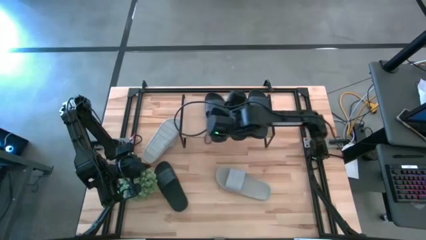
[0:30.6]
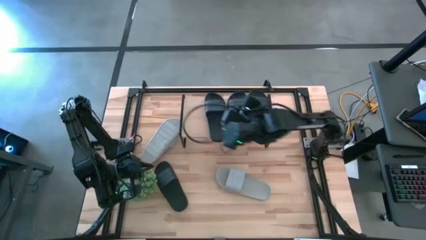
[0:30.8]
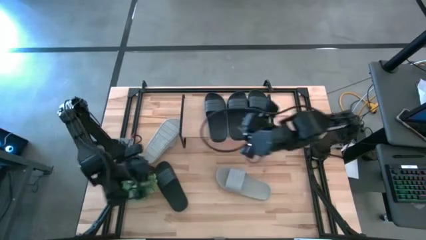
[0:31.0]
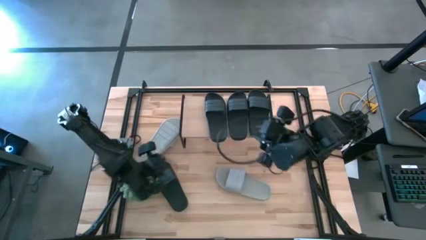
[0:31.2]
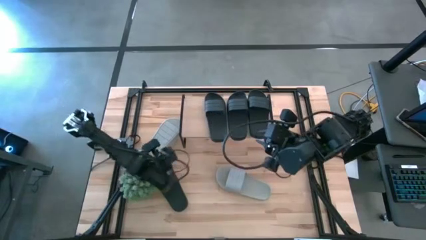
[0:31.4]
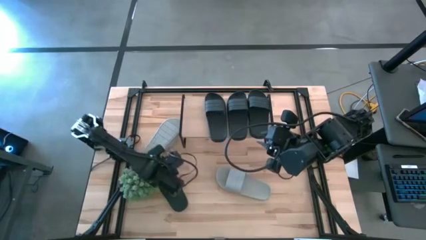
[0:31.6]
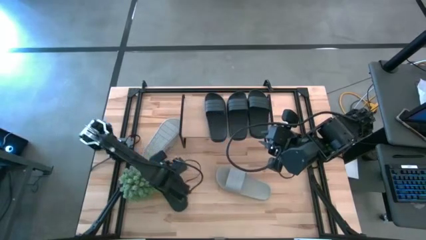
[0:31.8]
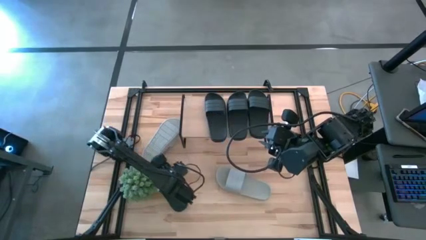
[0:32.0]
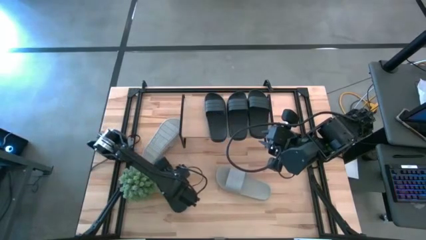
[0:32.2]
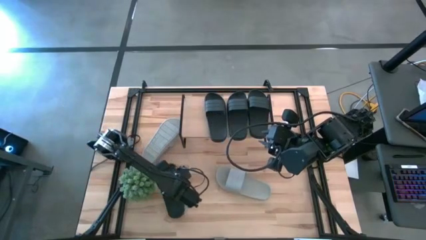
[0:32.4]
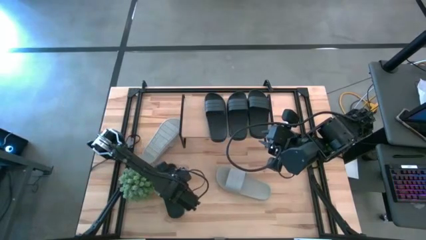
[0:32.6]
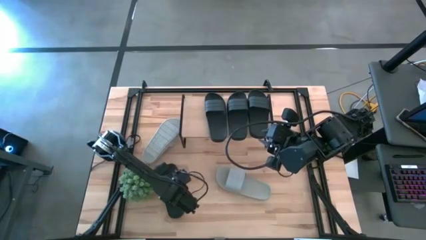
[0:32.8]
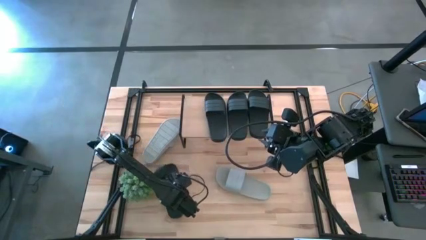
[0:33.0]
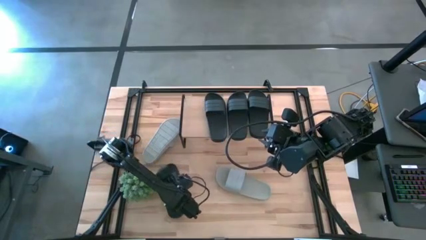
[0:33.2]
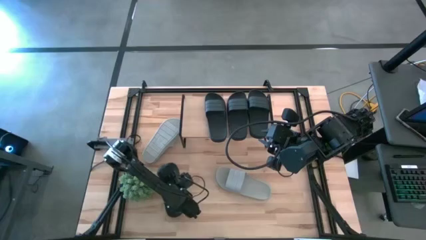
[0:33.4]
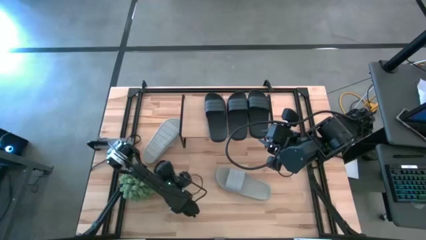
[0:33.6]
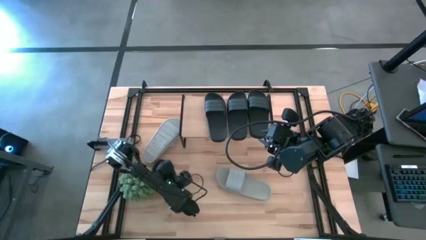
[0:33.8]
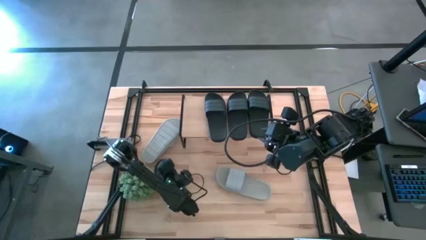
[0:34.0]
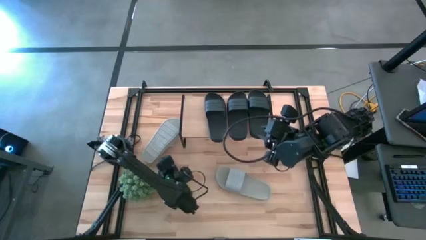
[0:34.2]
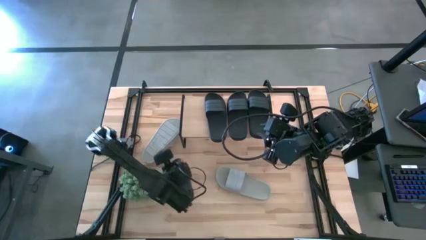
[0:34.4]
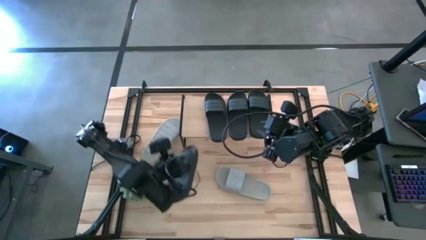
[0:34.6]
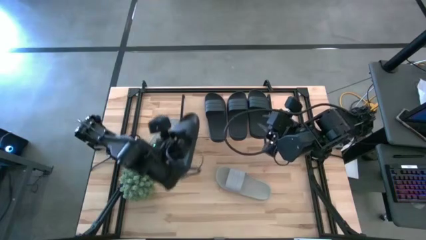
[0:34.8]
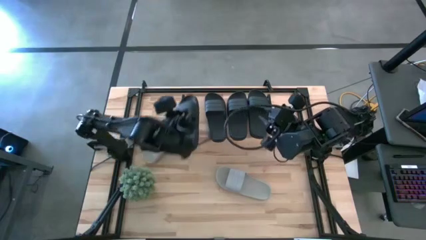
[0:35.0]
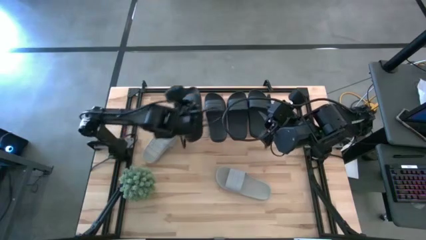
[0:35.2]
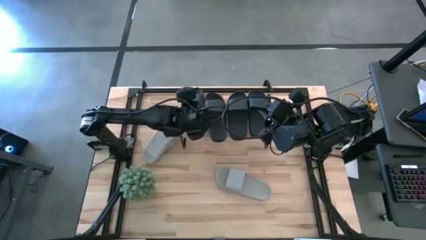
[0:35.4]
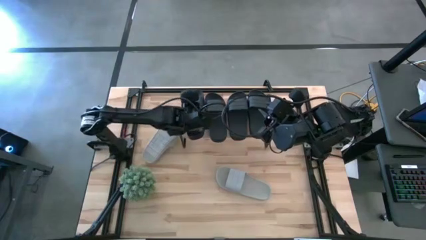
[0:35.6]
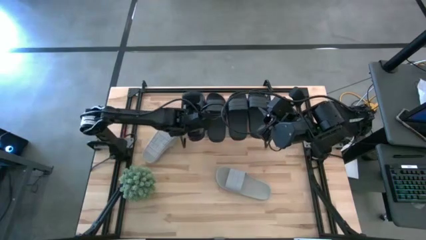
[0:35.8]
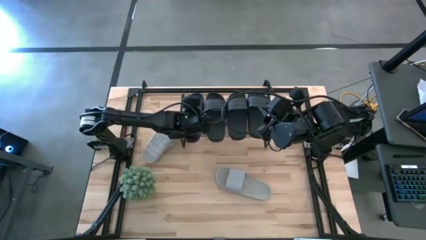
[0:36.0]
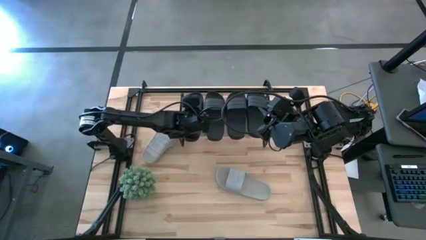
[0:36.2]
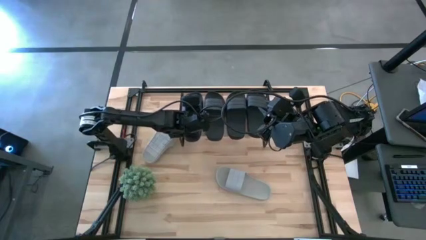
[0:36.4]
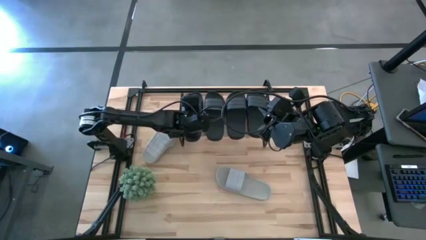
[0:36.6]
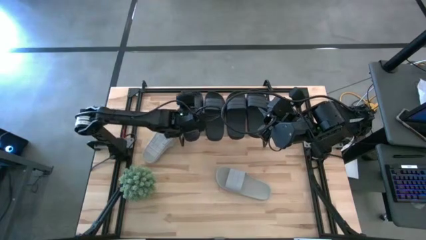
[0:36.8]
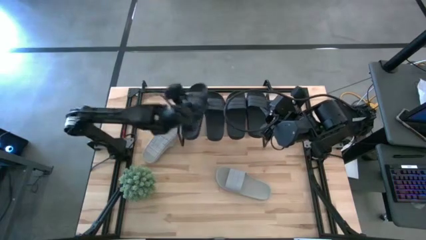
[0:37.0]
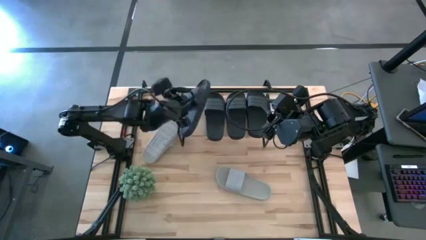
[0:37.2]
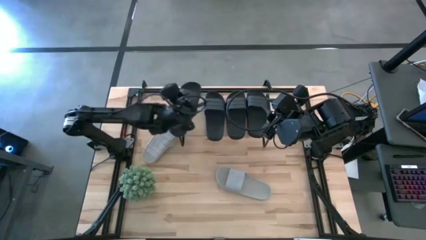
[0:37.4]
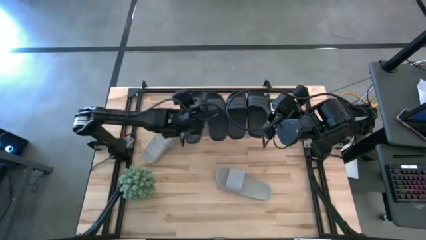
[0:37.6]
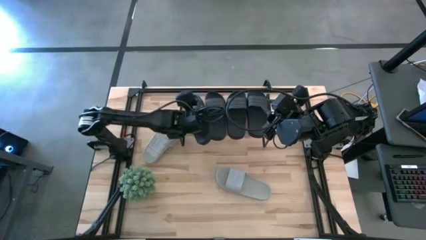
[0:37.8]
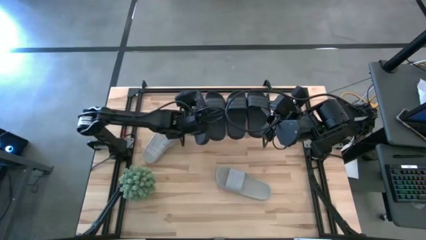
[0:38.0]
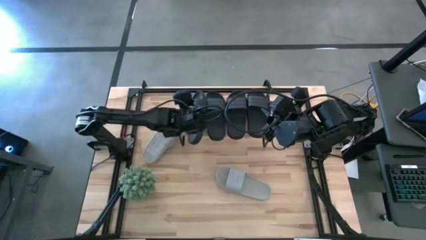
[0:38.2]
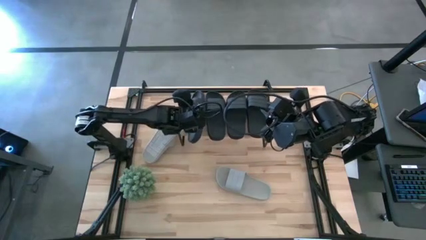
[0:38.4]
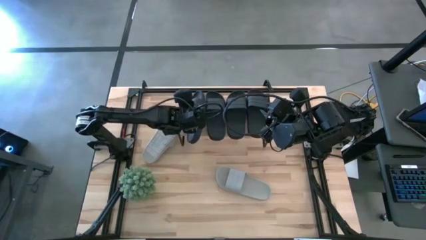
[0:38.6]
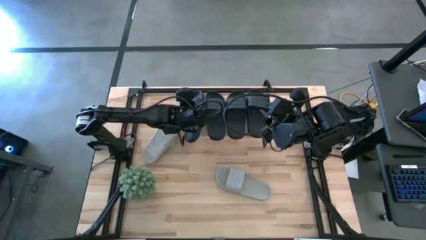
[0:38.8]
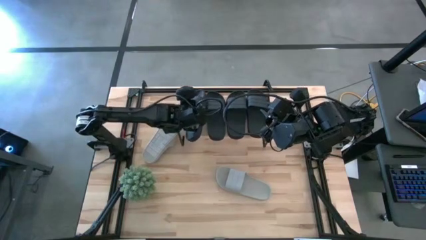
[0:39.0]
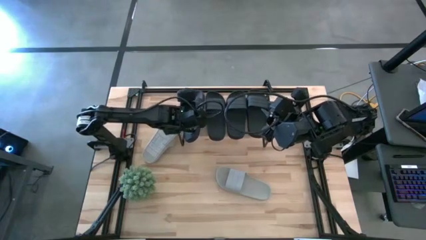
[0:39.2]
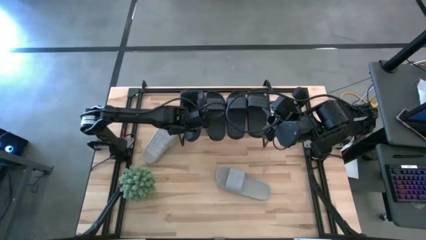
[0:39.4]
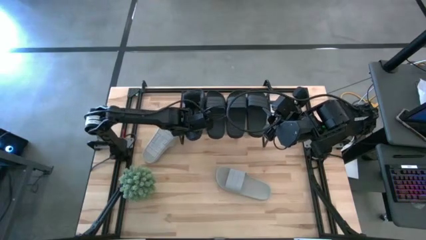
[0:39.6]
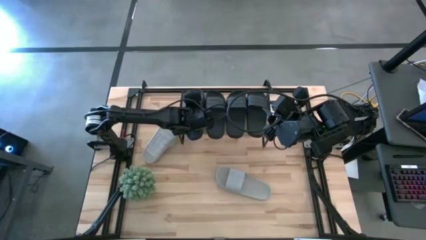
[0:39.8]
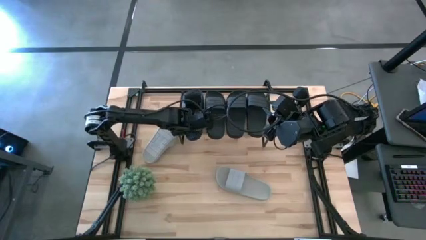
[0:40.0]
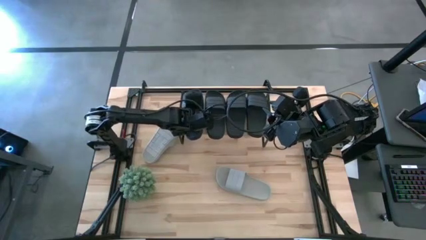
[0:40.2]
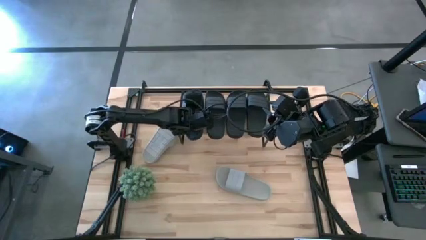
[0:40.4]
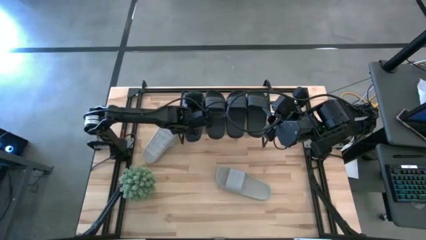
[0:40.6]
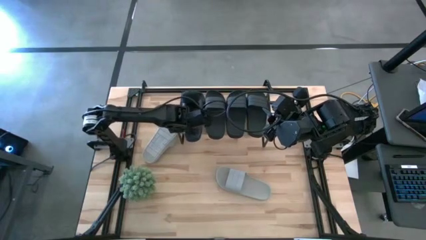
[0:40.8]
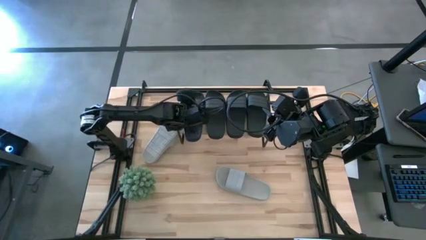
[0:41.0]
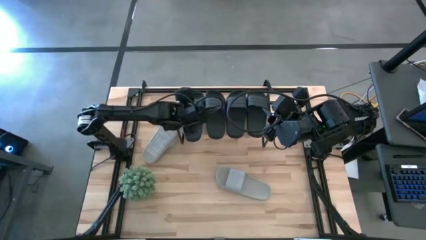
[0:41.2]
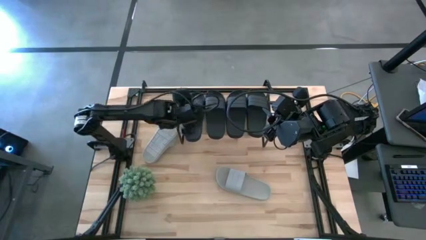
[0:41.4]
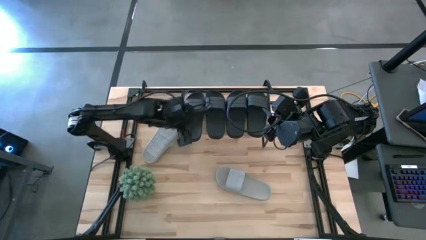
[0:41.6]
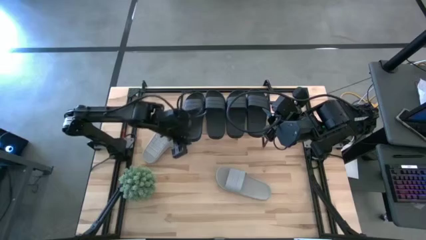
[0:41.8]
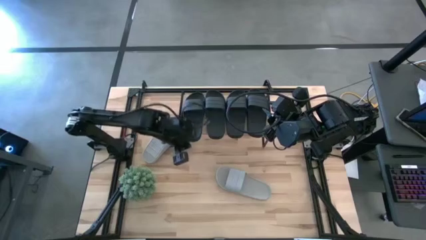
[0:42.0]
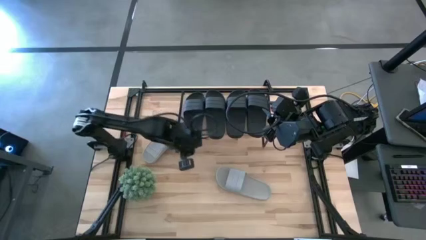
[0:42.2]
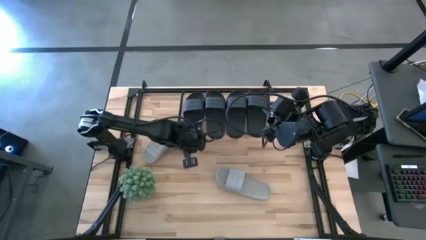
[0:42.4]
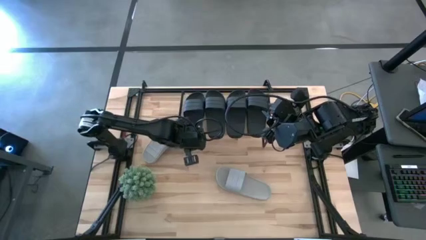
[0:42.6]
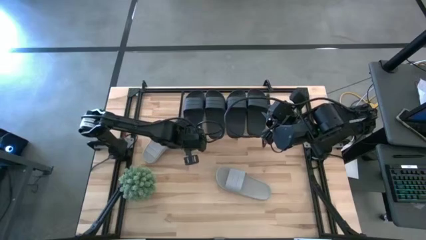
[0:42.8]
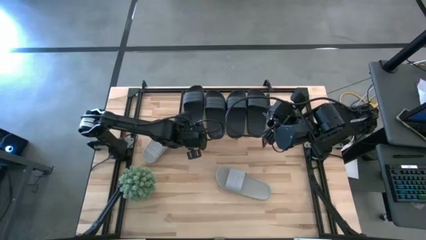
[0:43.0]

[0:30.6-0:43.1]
Task: Pick and place slides into the shelf
Put the black slipper on the shelf
